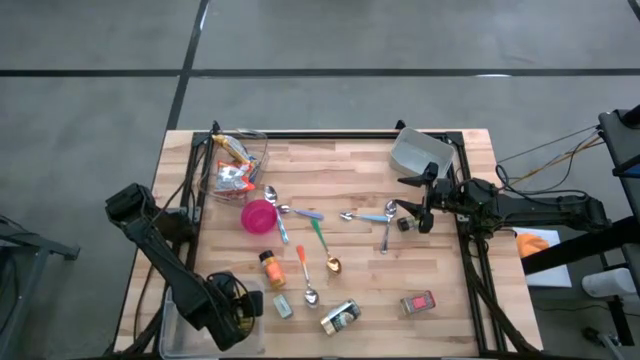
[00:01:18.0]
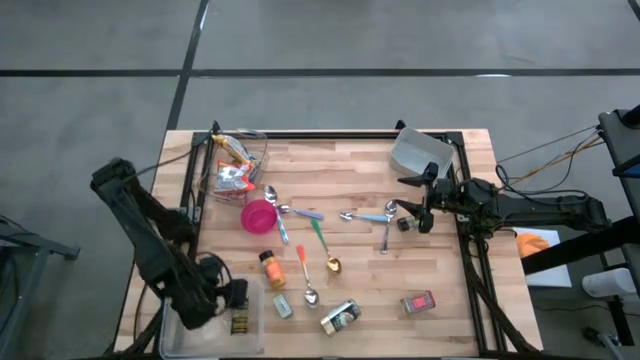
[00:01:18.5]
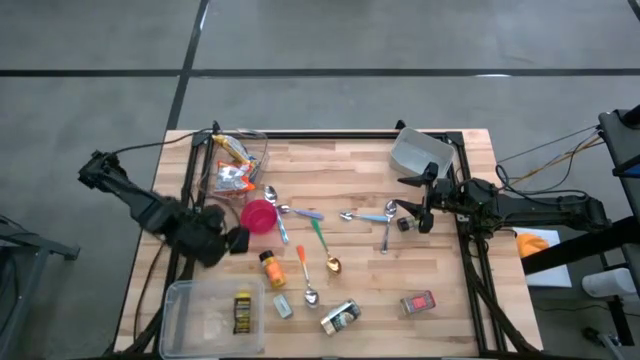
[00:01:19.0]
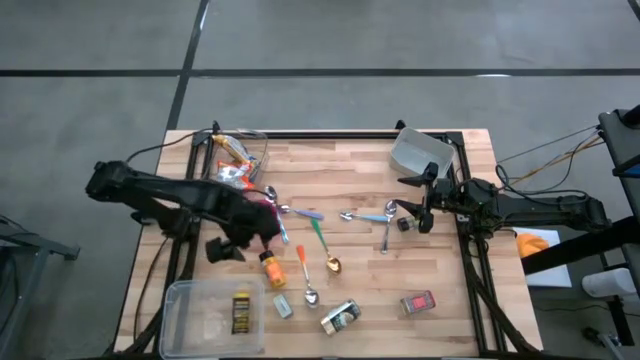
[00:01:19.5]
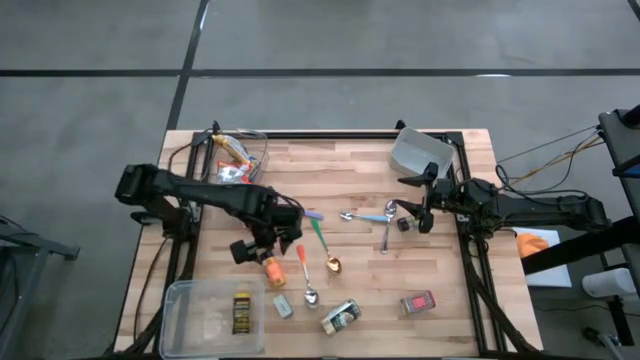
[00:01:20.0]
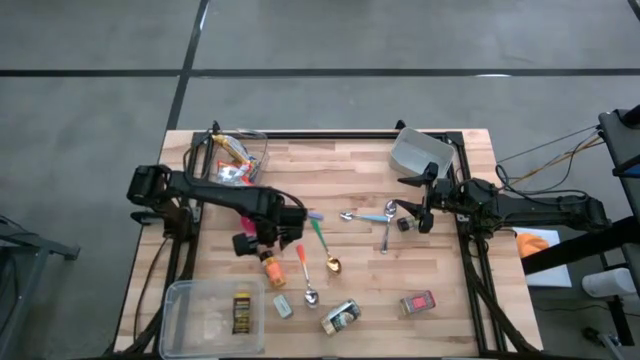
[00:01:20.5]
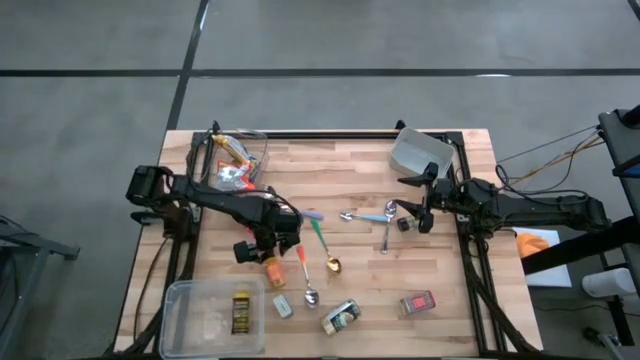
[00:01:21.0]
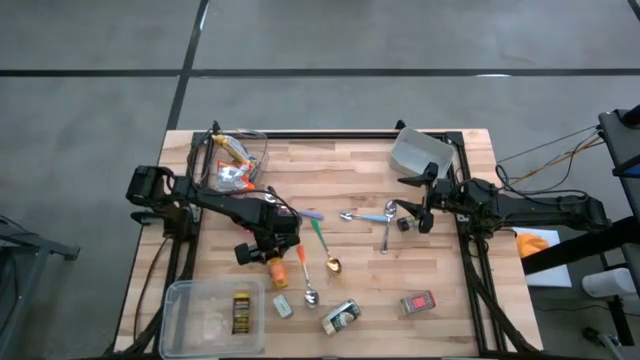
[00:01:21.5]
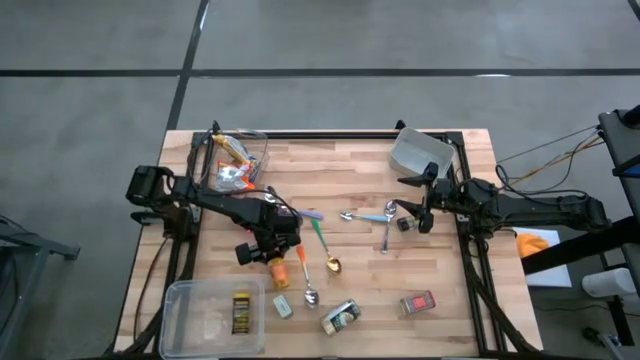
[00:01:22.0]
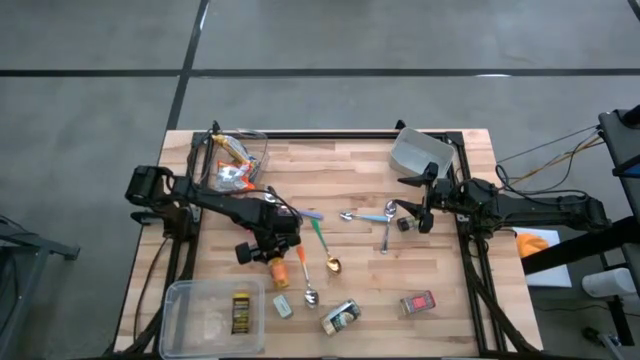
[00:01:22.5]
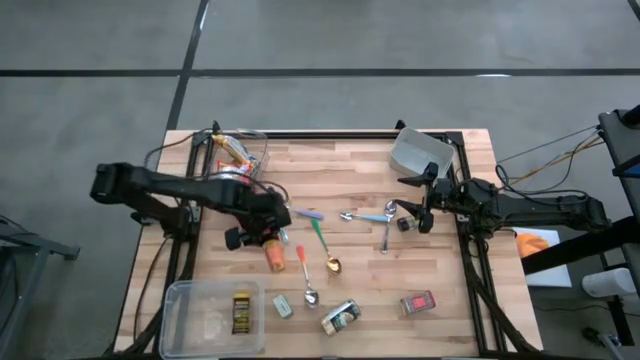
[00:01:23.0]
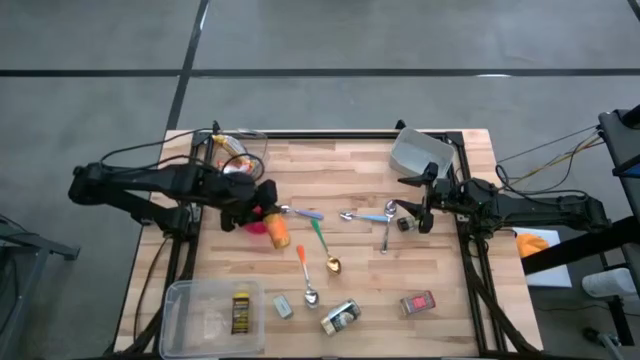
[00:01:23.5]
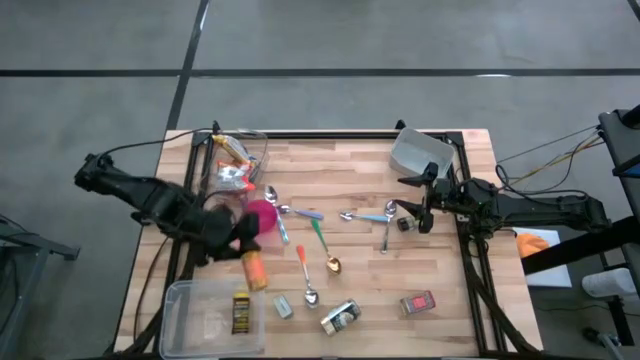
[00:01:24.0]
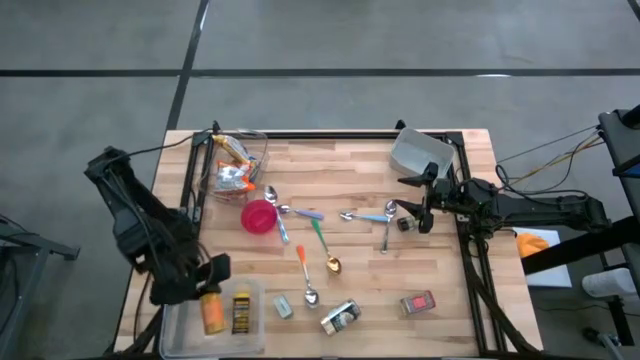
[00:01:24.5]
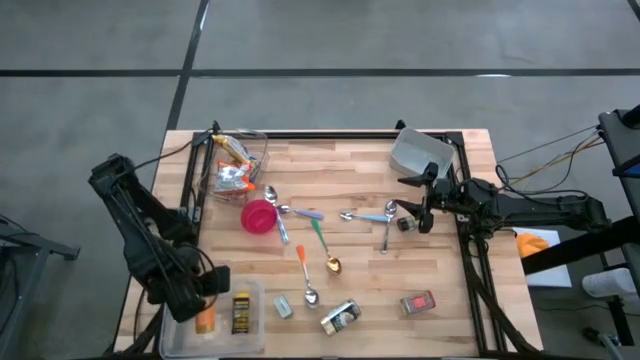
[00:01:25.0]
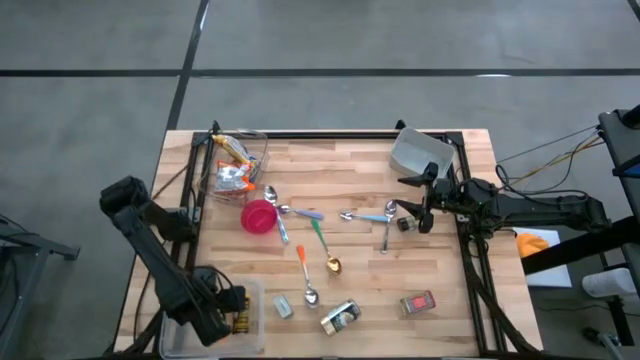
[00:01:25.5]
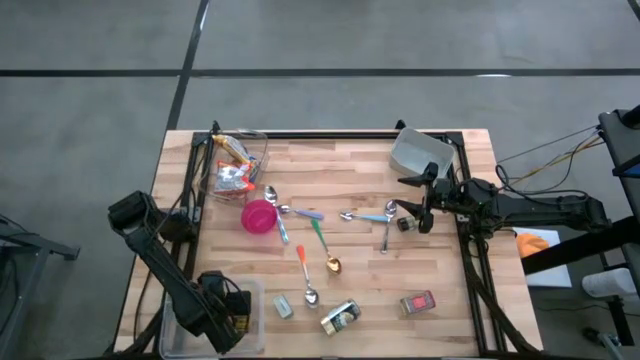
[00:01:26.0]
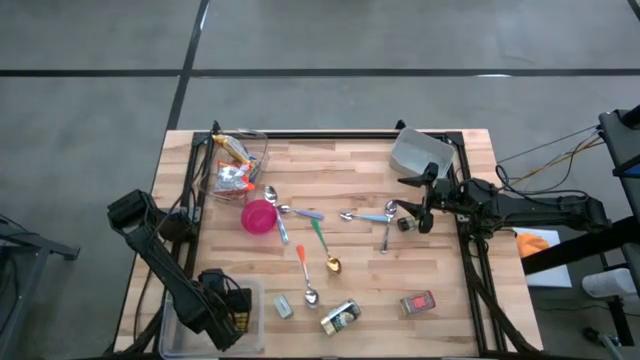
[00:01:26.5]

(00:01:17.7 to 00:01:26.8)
Put the brown seasoning bottle into the white bin
